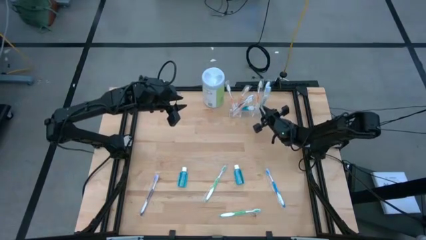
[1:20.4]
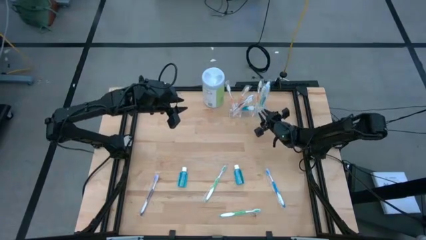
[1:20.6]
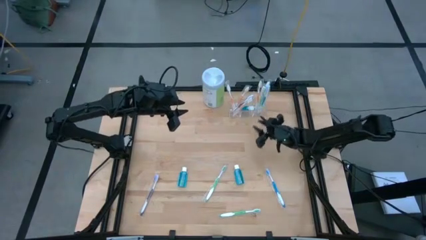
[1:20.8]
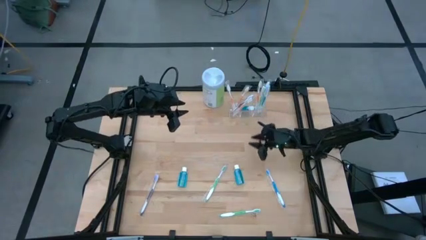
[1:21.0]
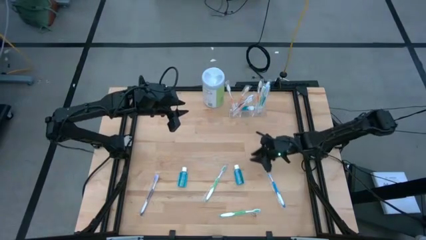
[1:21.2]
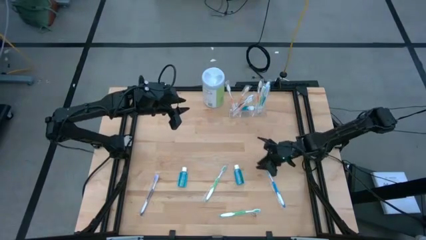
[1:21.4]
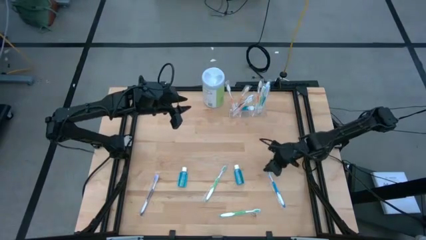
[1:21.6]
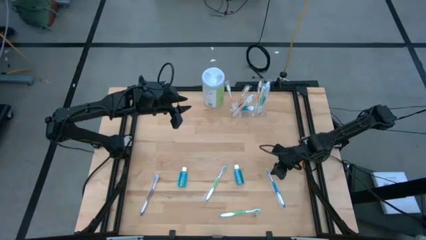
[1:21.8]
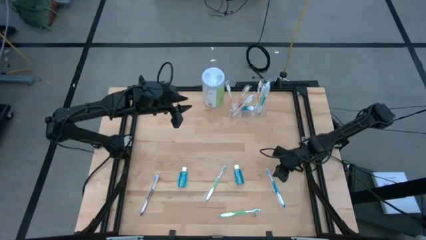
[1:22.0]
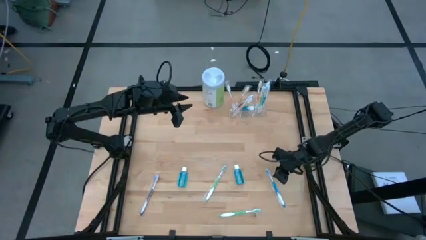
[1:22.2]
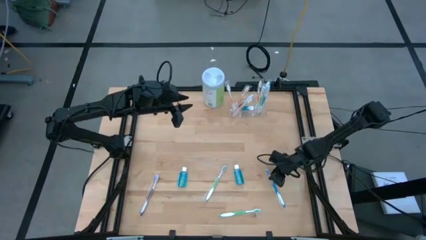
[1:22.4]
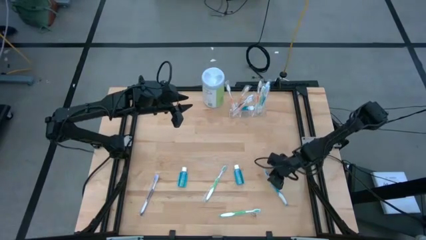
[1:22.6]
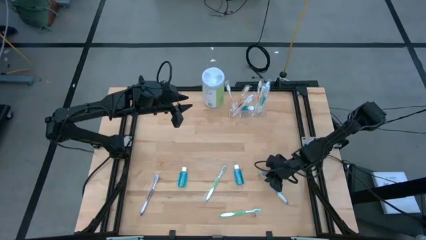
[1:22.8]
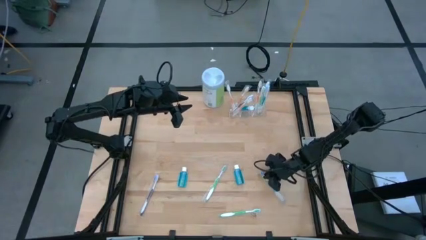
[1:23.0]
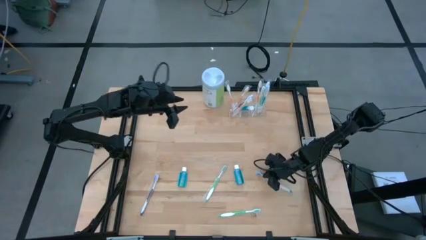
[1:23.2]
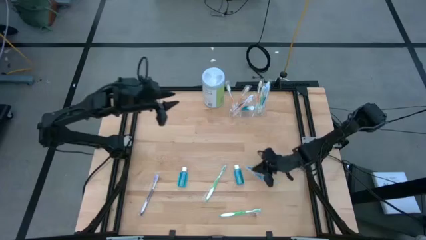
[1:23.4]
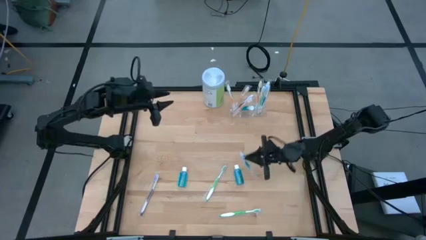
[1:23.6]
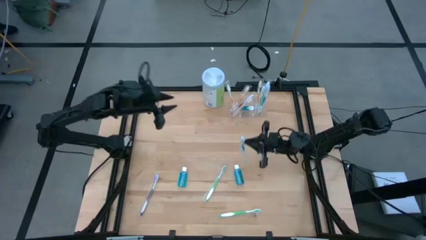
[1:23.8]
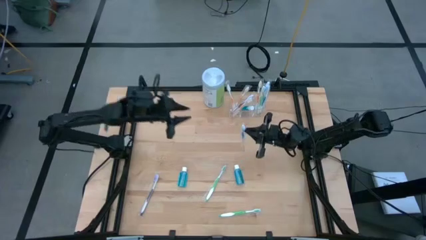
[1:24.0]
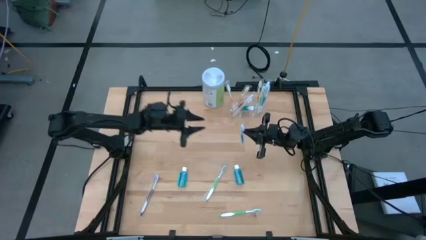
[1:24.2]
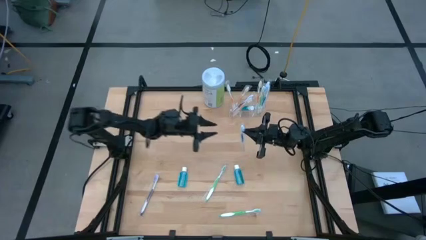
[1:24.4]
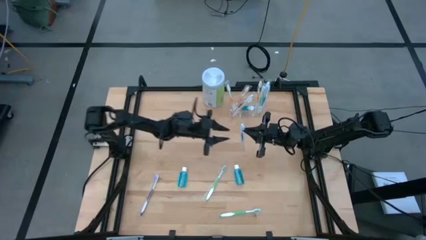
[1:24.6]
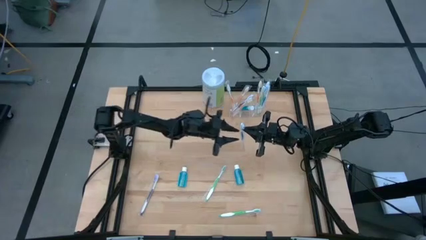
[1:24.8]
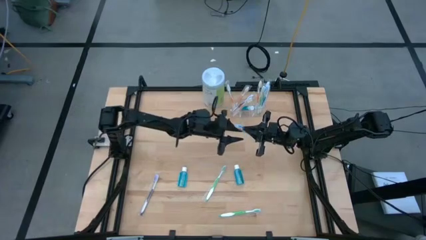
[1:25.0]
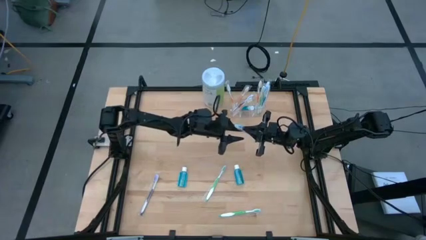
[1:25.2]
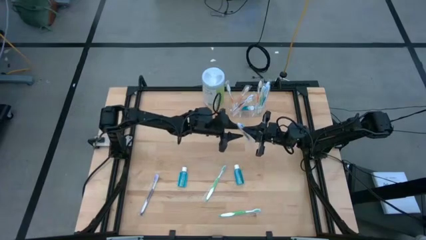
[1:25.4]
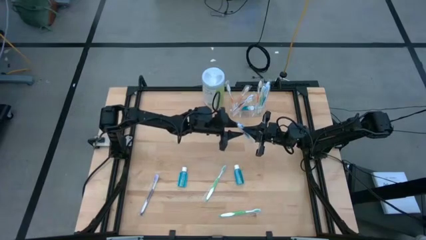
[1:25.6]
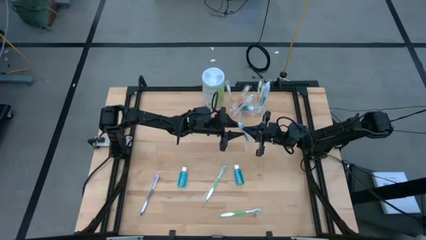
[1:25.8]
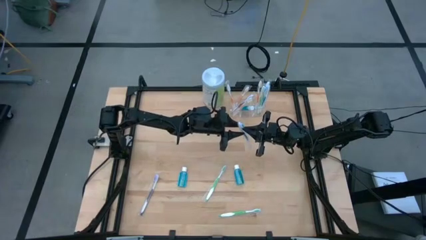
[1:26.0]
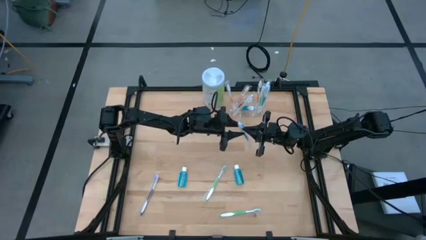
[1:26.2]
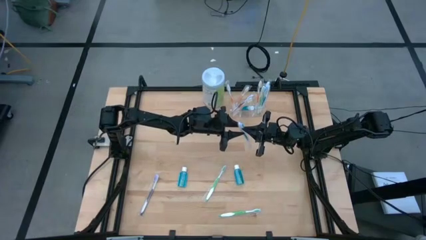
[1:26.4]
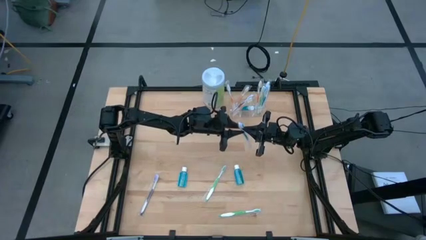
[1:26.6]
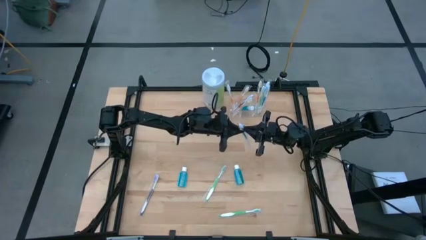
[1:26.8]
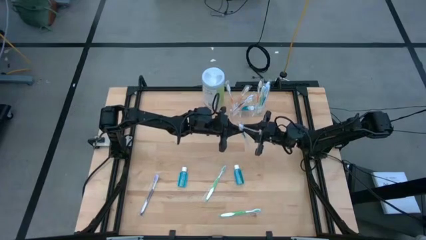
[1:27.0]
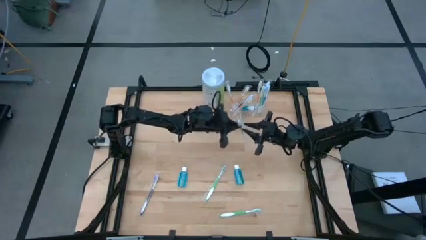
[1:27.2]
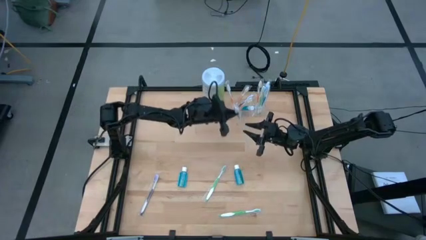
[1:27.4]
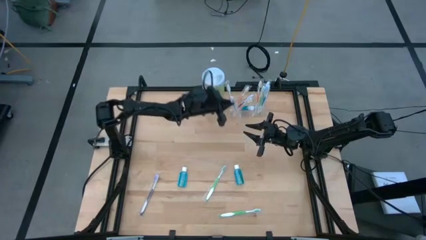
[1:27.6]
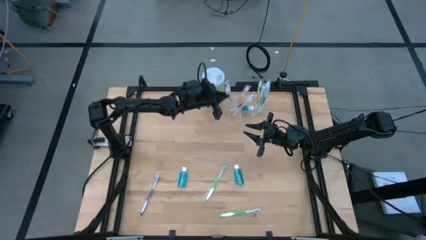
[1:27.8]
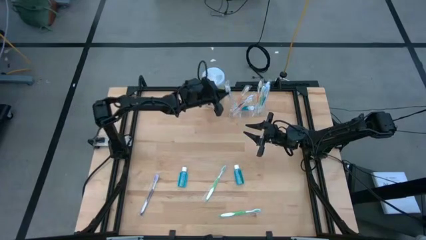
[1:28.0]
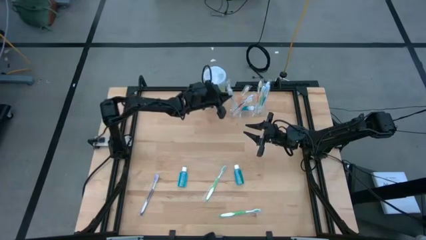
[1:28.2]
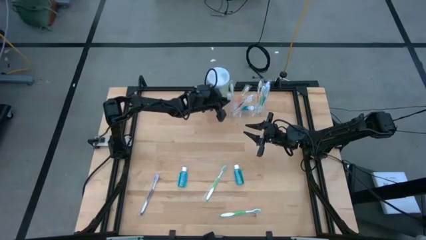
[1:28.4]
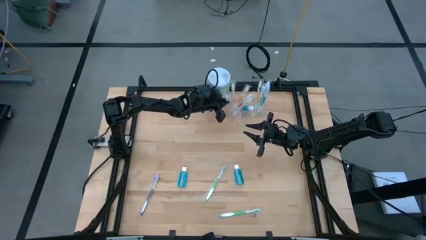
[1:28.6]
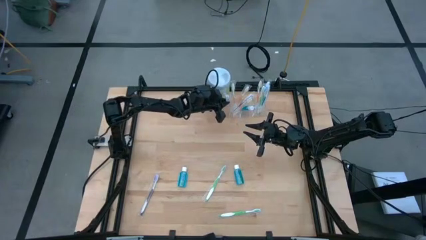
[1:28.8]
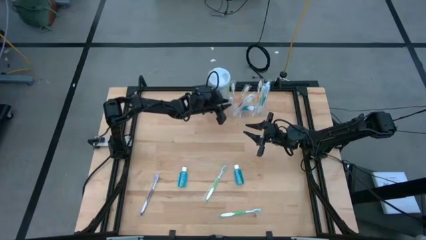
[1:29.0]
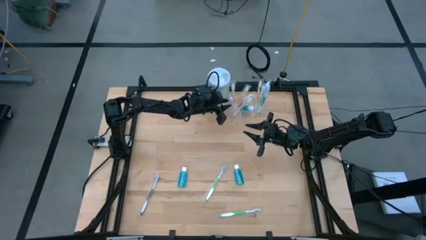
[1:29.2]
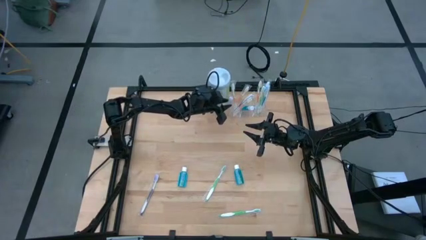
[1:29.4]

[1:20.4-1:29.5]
Task: Pick & Place toothbrushing station
Put the blue toothbrush into the transparent organizer

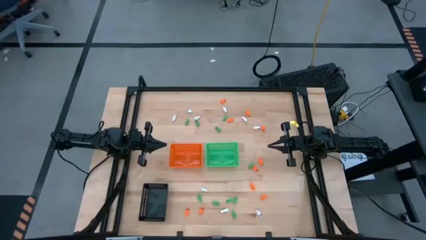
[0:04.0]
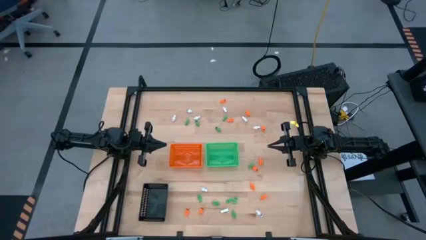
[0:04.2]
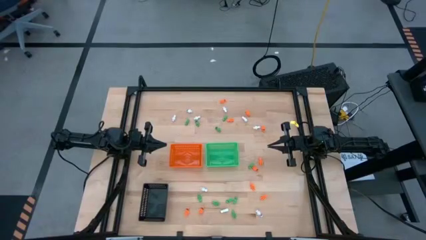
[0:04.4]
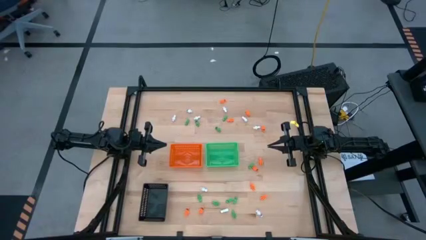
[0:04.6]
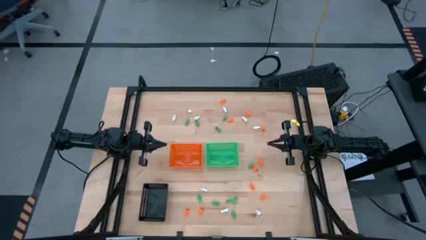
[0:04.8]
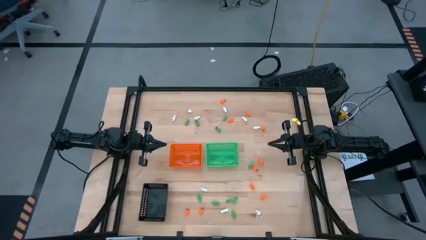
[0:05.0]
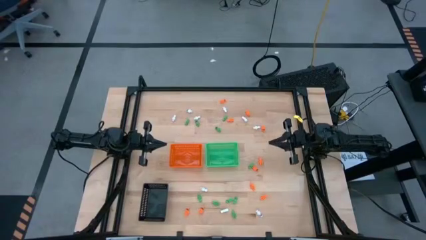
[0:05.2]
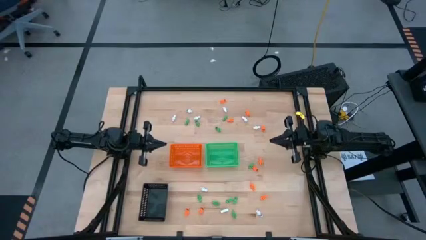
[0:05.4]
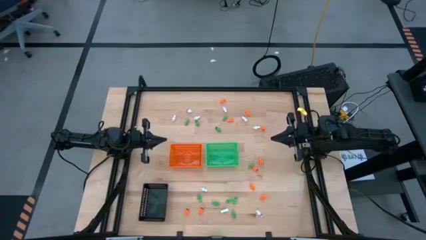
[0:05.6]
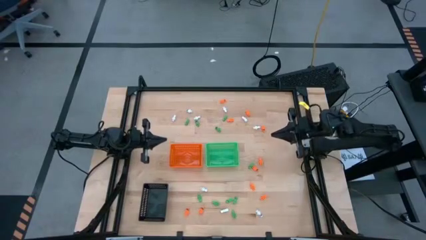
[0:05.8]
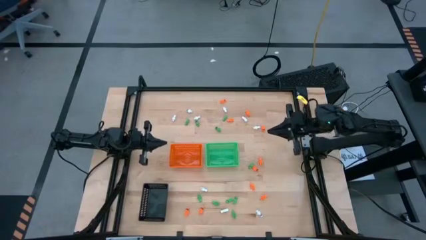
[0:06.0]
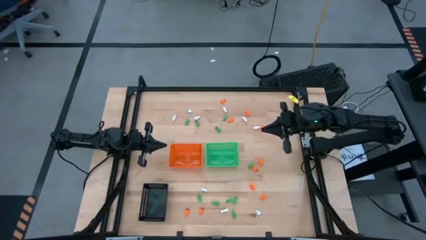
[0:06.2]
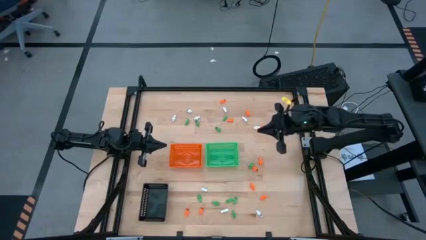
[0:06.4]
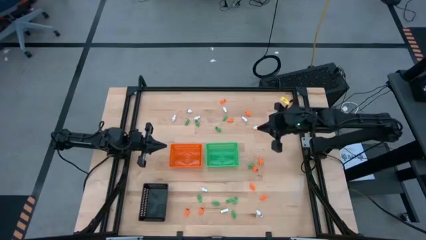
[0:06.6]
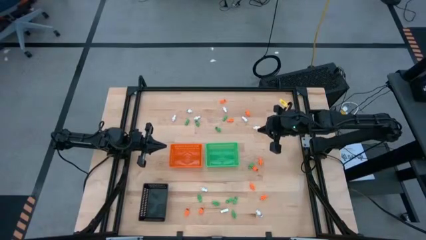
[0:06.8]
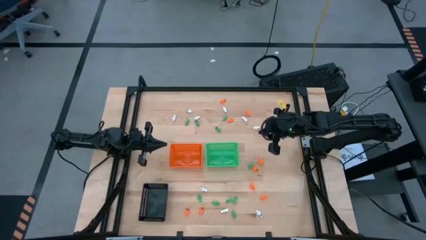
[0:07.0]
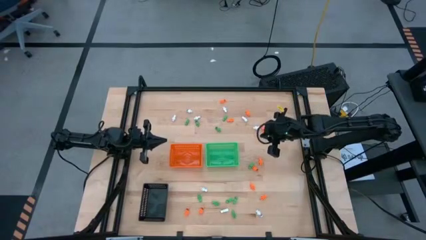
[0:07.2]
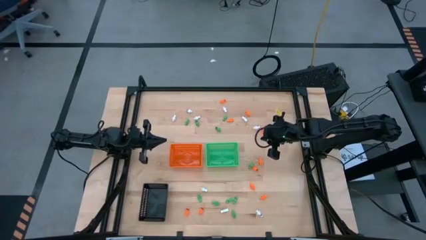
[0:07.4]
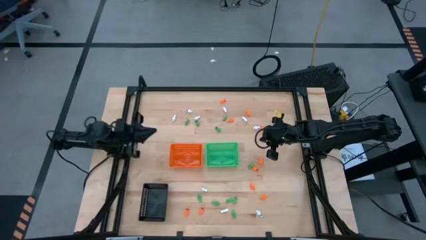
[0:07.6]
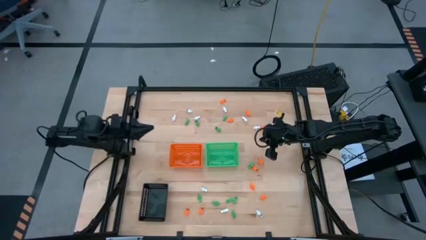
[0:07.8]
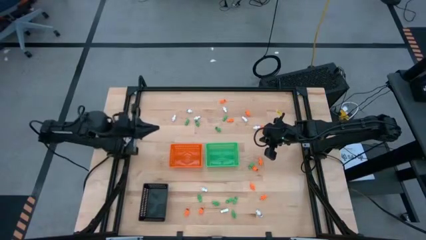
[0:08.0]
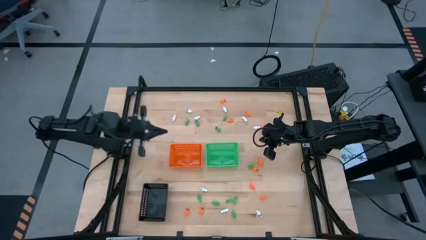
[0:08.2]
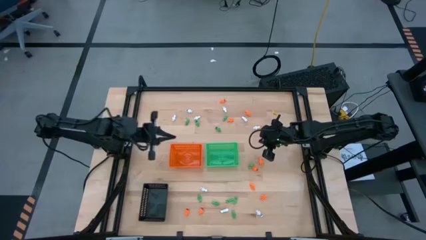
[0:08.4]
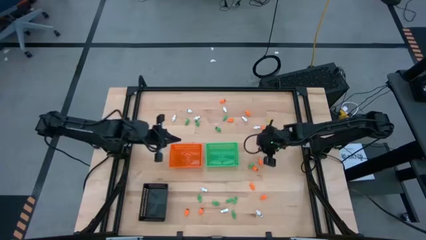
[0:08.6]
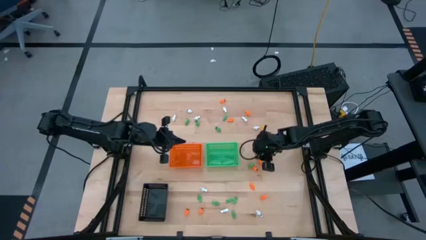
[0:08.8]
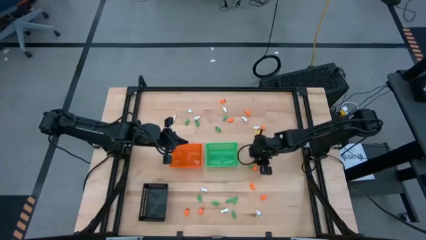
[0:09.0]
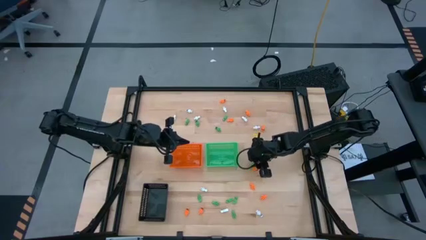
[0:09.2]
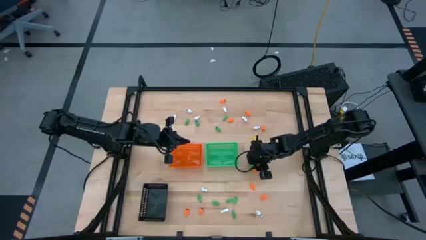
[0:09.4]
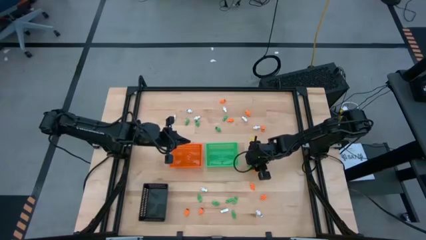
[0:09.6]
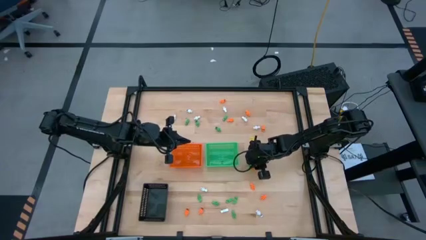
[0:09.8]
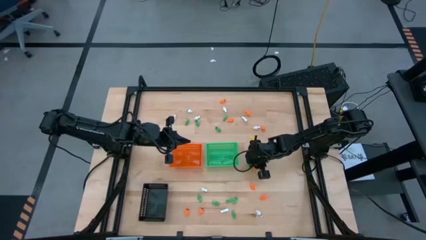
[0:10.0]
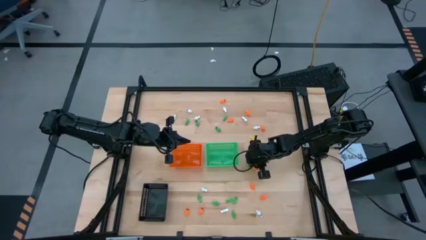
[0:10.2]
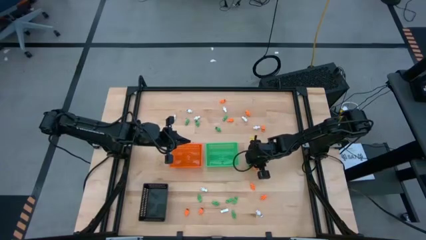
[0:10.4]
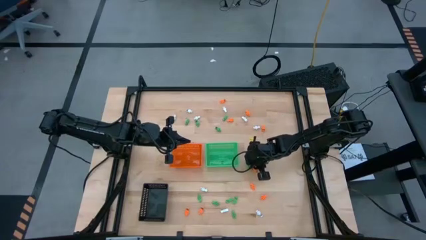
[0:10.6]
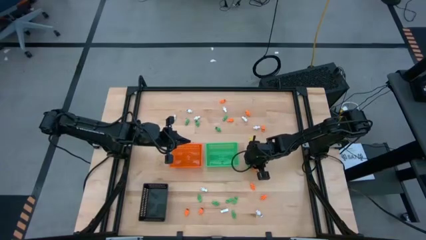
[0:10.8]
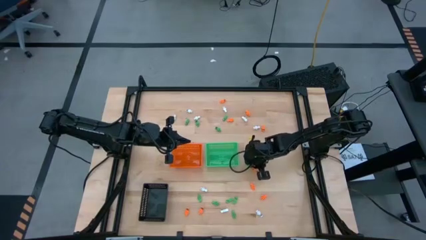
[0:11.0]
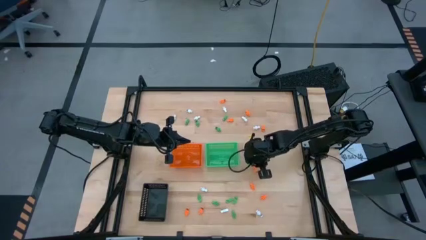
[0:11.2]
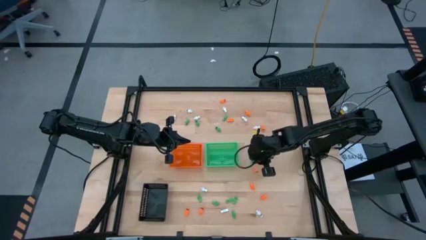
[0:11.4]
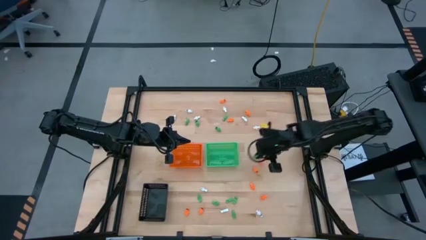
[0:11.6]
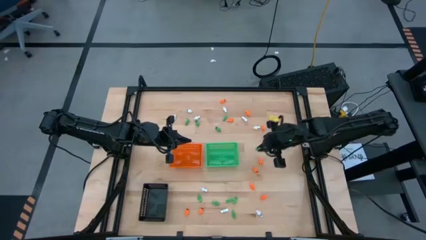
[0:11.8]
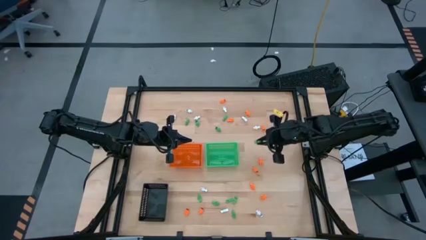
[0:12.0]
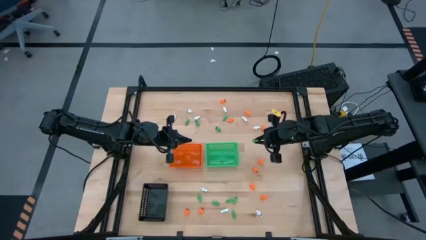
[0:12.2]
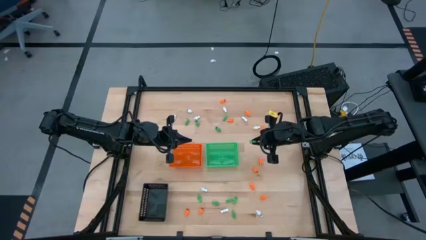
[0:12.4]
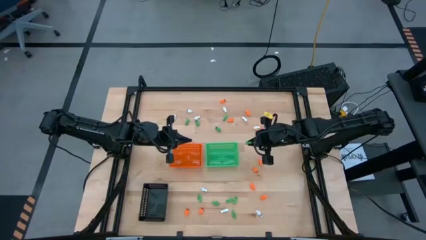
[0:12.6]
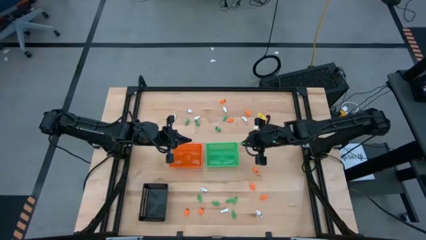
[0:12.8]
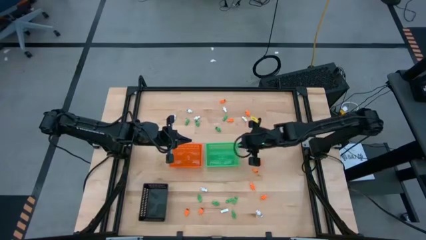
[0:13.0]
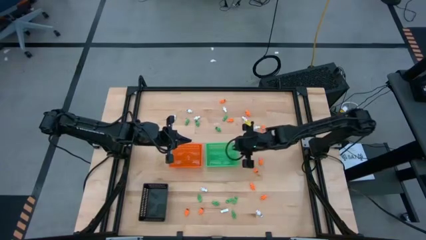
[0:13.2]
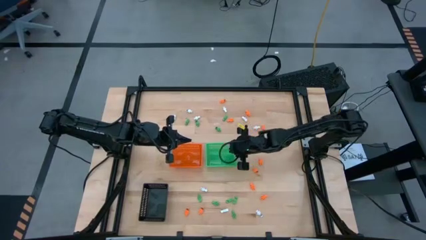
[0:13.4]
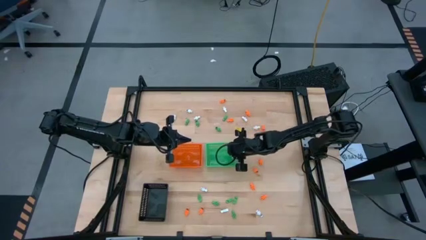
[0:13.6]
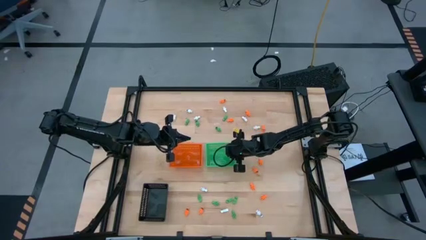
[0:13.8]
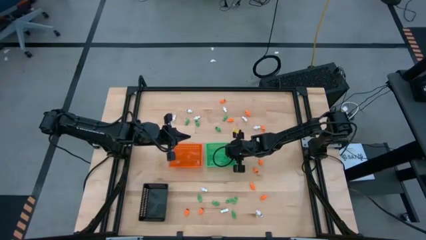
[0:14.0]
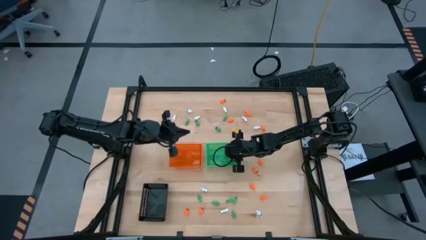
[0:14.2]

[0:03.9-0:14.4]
Task: Sort Halloween decoration
Put the green skeleton toy into the green bin
